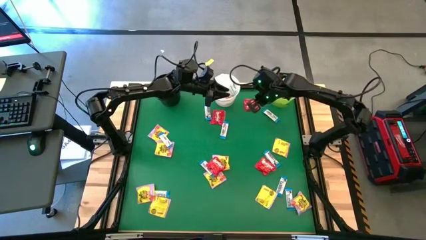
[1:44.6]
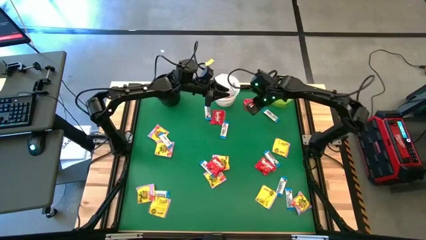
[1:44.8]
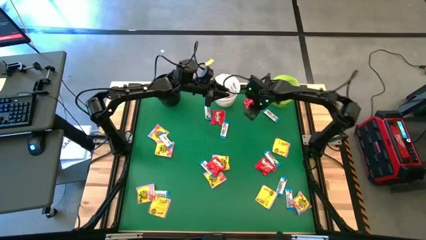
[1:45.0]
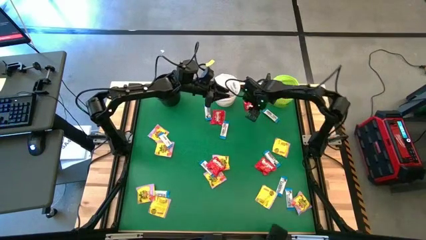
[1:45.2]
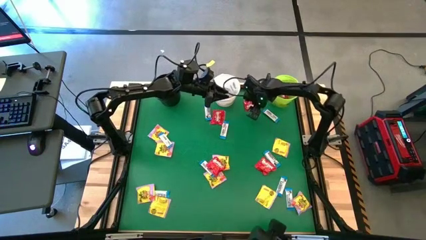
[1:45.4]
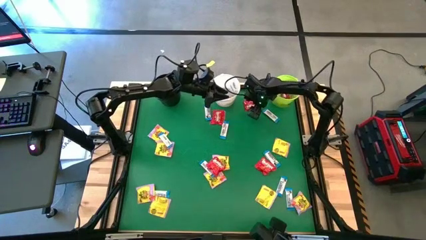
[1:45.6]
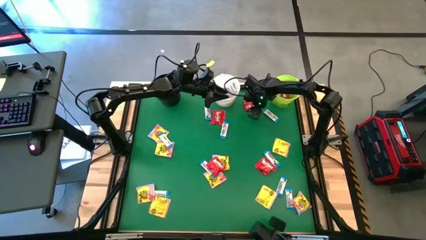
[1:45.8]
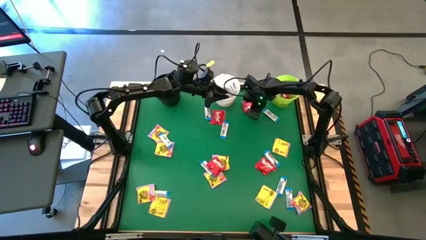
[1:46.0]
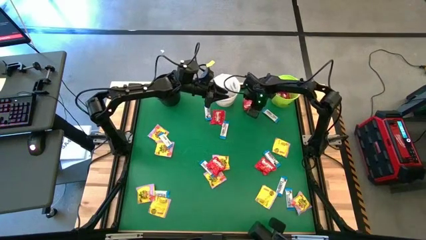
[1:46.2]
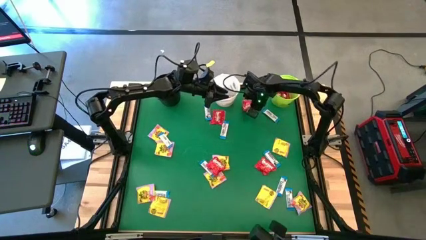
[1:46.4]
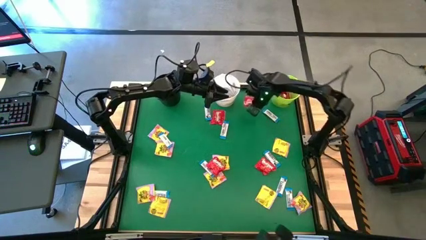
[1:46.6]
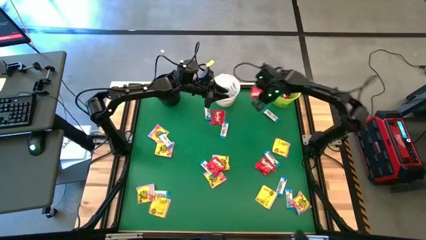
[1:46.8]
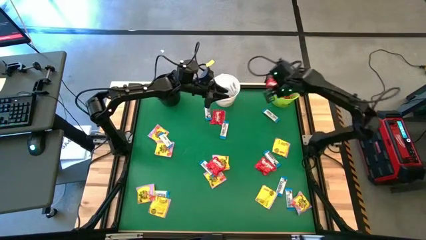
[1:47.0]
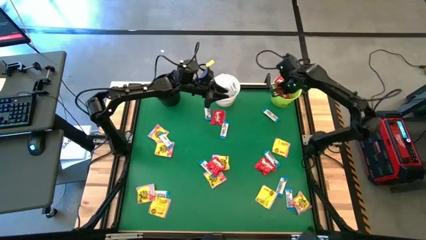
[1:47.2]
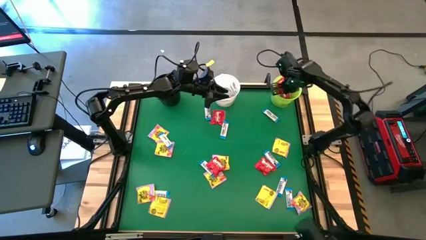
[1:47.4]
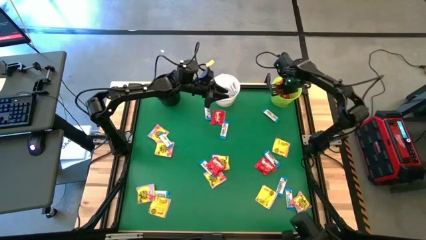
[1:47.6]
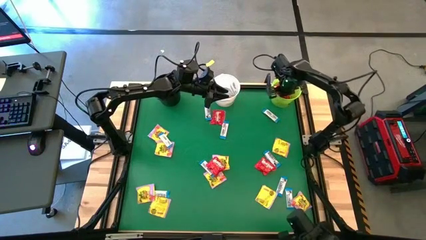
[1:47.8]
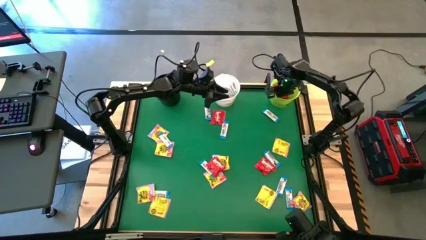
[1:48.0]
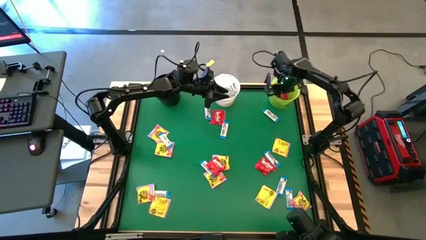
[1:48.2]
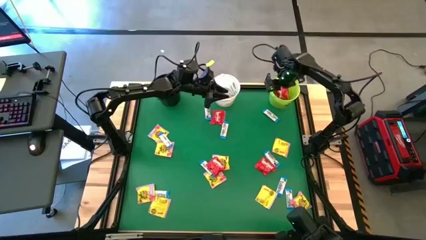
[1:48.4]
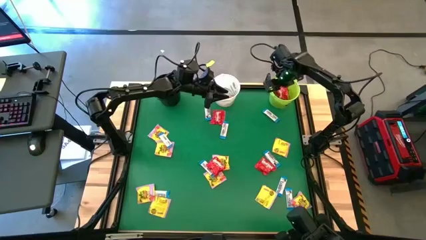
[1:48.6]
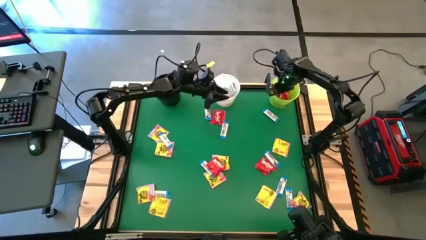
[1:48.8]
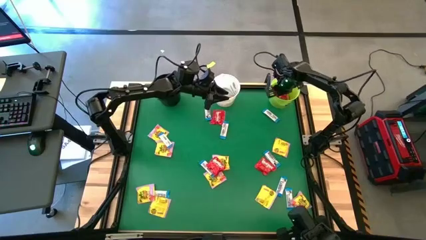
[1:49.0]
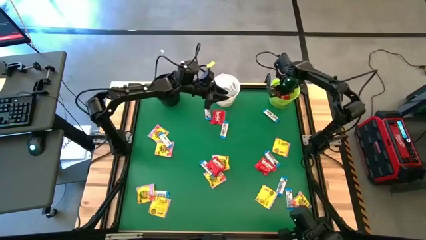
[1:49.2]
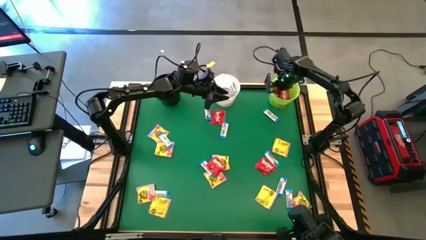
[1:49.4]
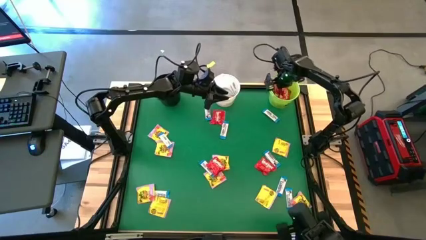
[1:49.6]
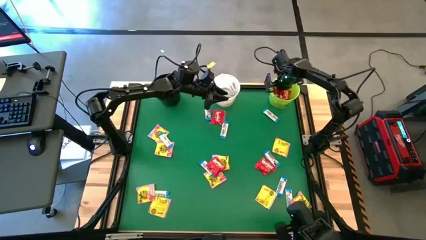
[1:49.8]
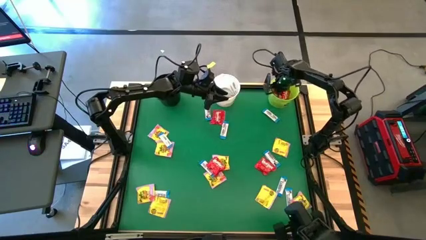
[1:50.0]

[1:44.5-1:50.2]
Task: Sort candy by brand, put in halloween buckets
Put the red candy into the green bucket

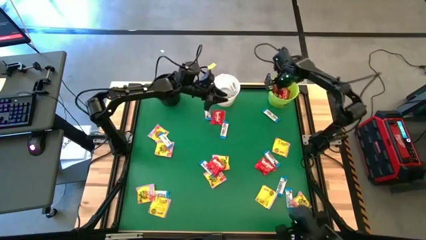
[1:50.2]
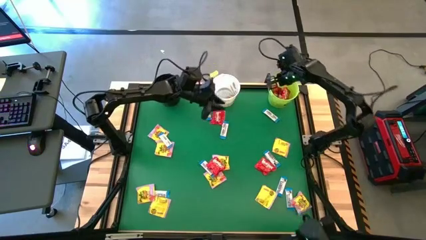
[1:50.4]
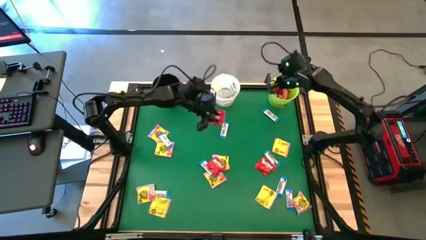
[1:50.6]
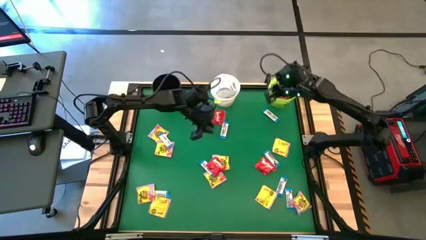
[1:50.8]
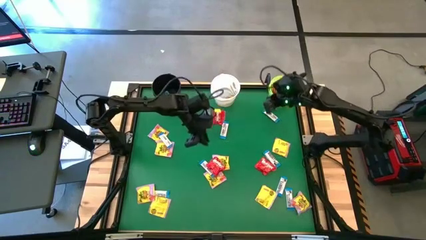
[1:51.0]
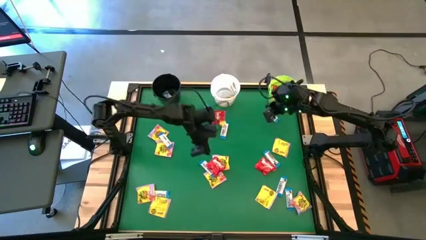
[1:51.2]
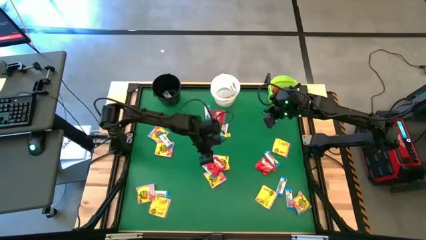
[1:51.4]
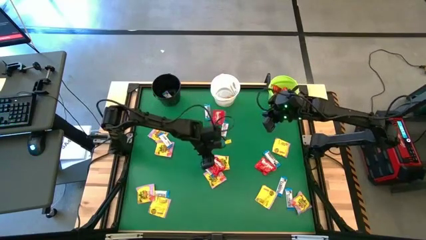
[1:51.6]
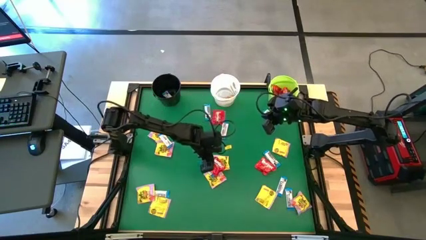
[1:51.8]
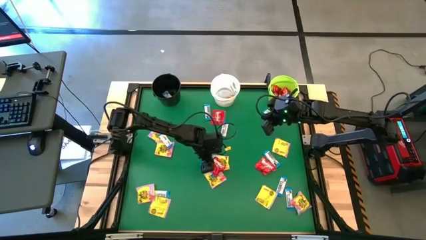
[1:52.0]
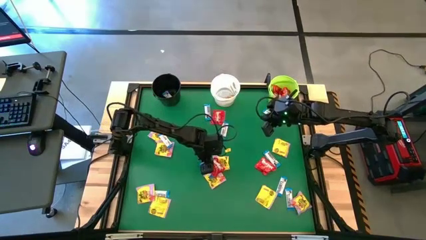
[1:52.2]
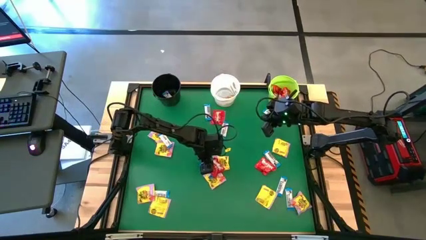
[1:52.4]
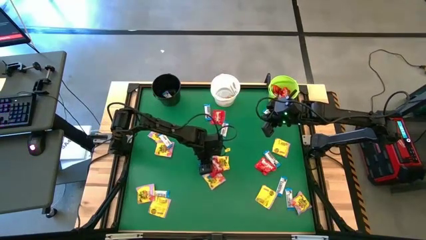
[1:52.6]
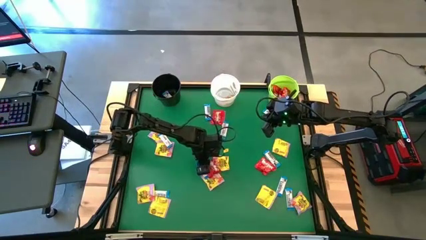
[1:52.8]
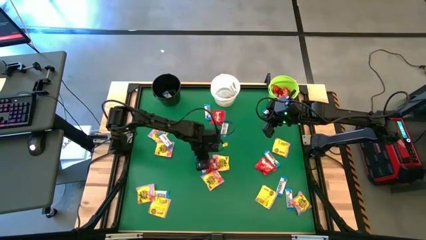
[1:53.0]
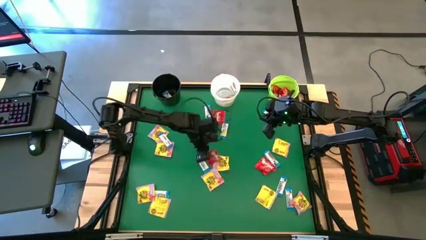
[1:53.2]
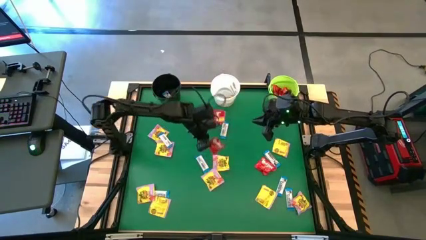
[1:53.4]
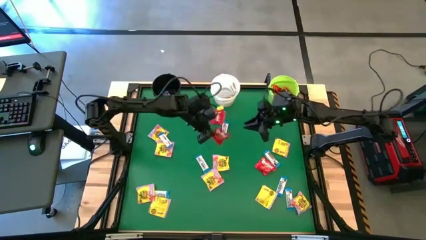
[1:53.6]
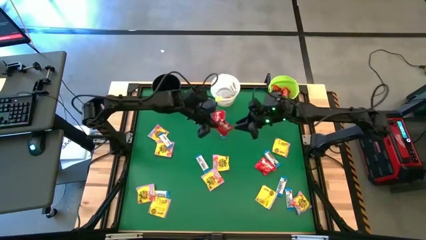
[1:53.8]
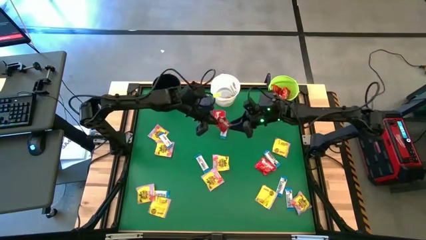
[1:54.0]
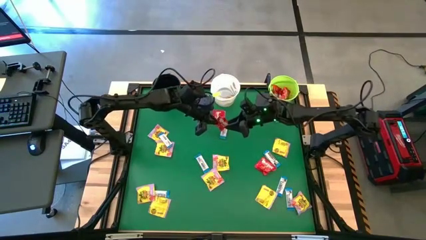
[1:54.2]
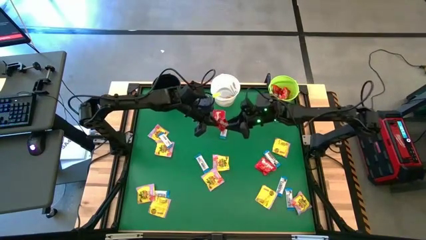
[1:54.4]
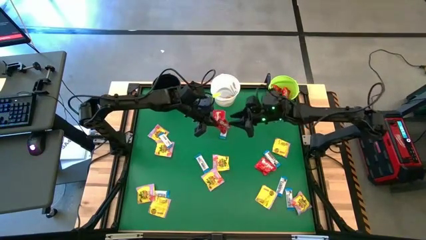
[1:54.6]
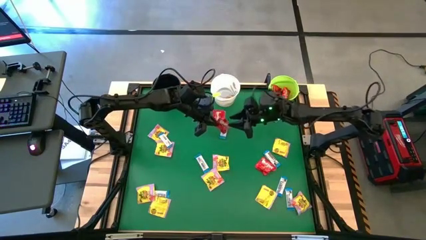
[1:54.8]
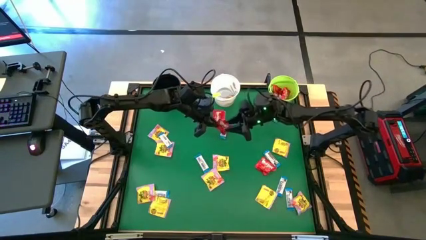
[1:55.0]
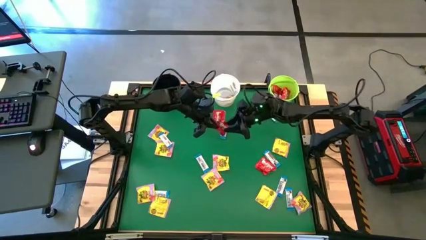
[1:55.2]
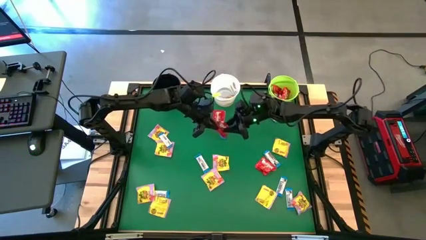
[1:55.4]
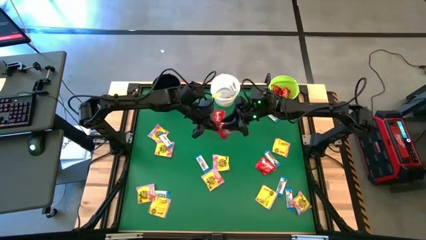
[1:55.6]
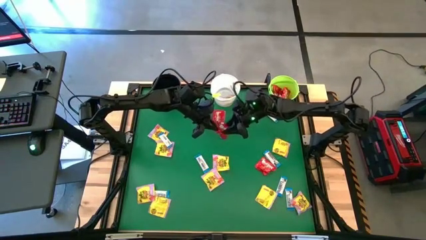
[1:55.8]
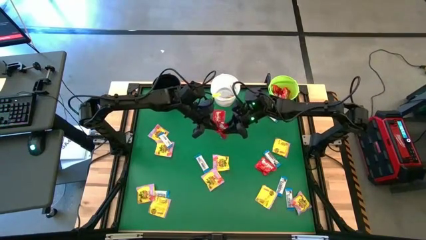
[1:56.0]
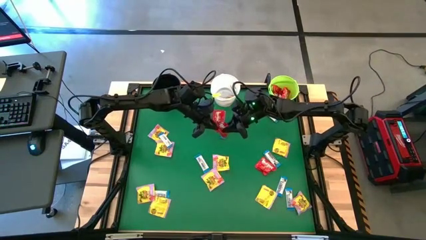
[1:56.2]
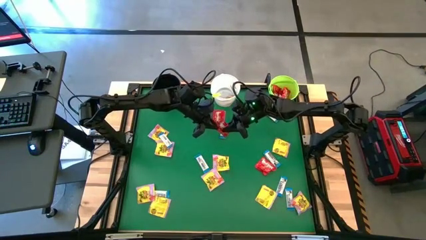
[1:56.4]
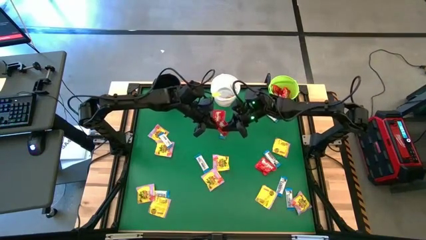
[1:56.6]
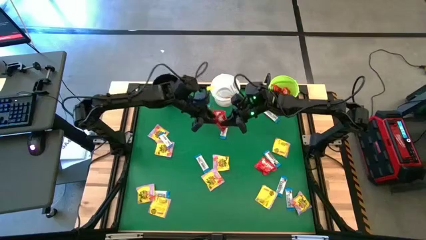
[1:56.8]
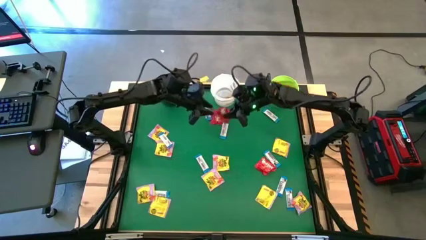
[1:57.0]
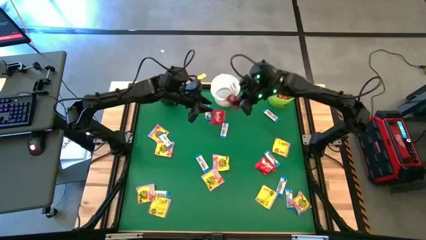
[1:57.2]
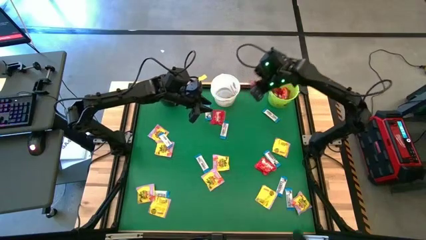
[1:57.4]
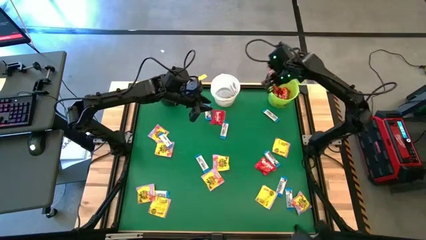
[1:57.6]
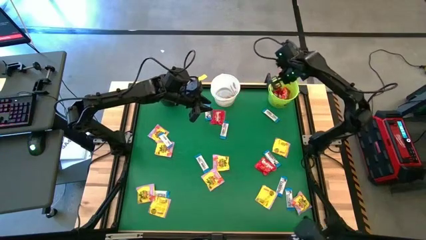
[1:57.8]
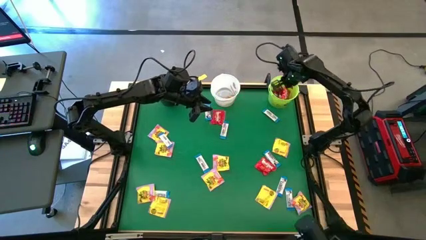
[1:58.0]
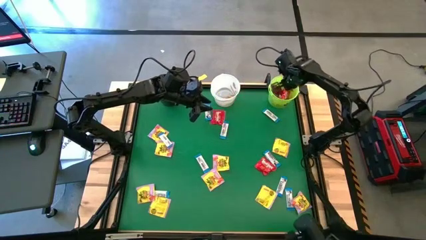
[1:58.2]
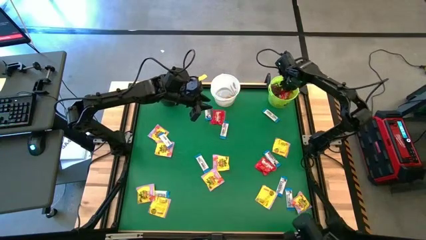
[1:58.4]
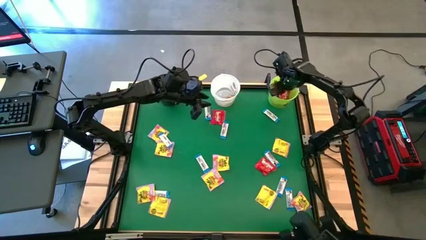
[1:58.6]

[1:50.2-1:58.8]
Put the red candy into the green bucket

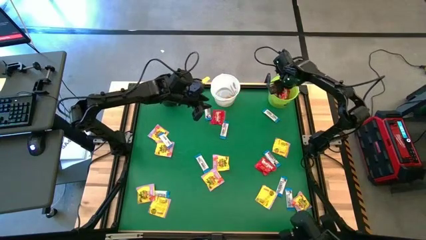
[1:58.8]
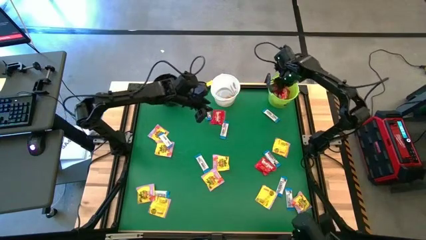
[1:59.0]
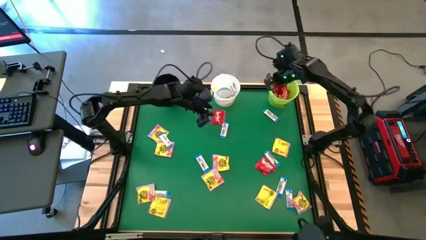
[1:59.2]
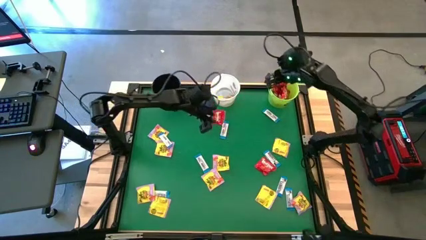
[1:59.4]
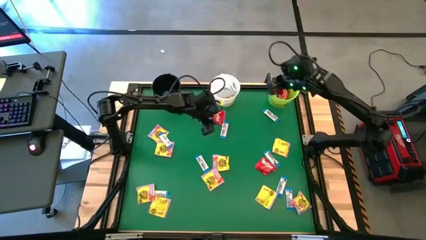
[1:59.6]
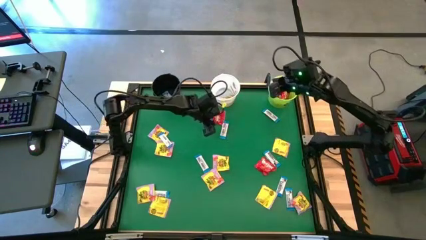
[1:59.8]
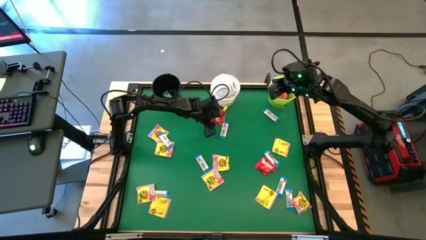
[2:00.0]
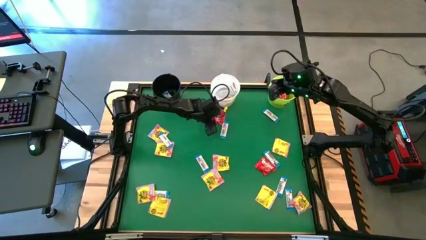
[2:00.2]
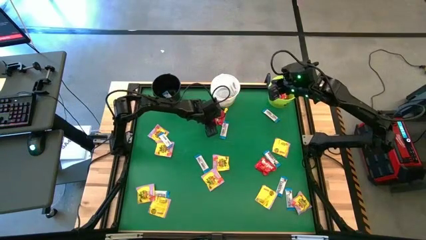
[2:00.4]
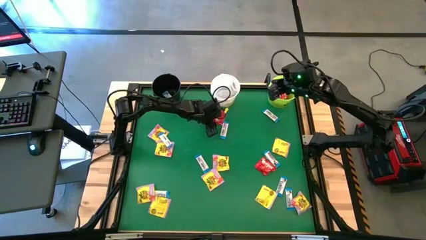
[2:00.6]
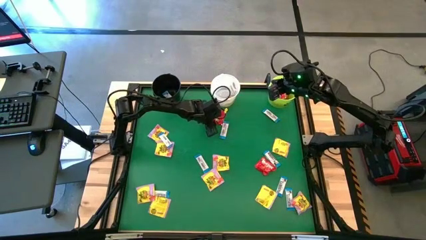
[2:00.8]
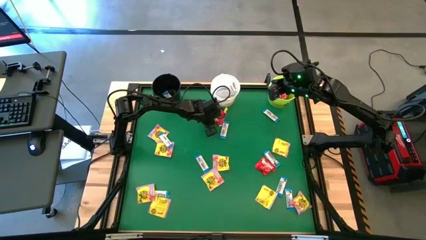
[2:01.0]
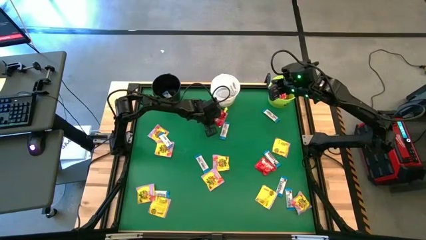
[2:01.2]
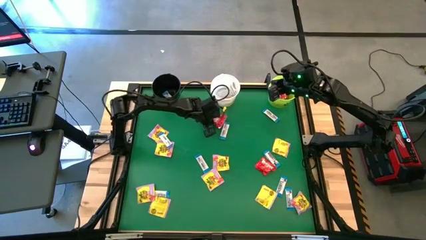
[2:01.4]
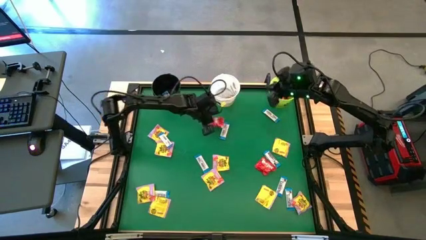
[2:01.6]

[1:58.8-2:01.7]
Put the red candy into the green bucket
